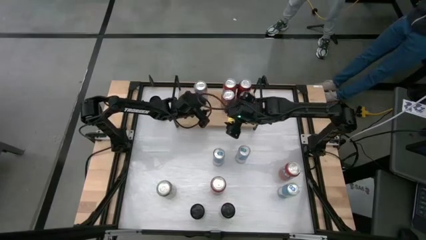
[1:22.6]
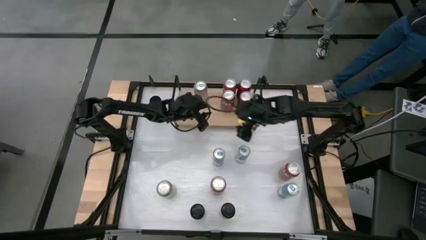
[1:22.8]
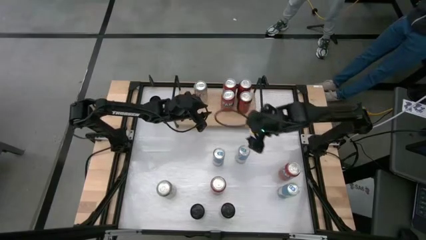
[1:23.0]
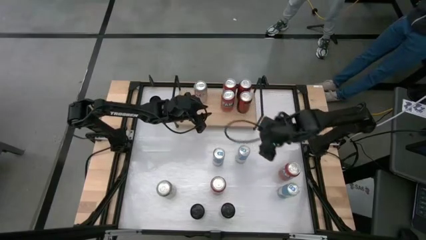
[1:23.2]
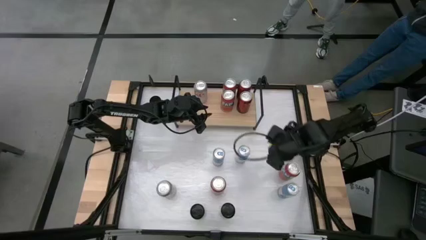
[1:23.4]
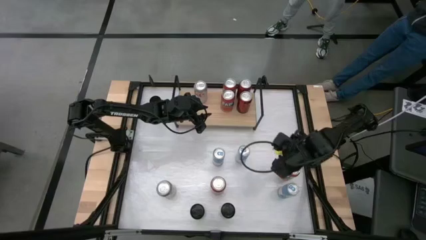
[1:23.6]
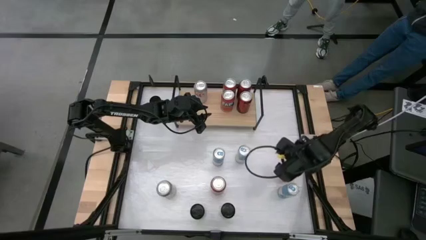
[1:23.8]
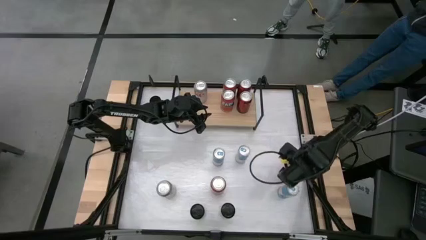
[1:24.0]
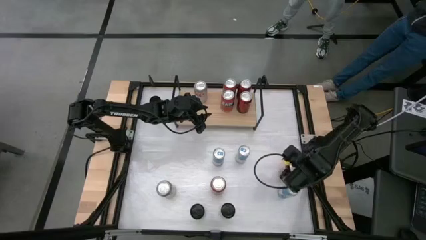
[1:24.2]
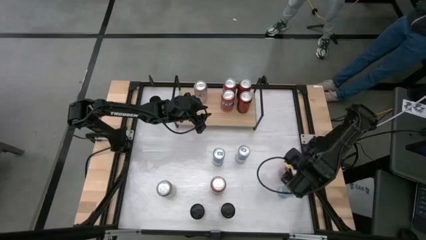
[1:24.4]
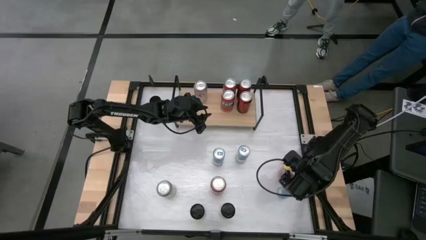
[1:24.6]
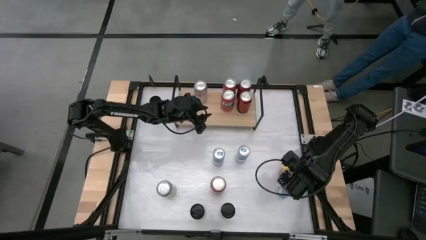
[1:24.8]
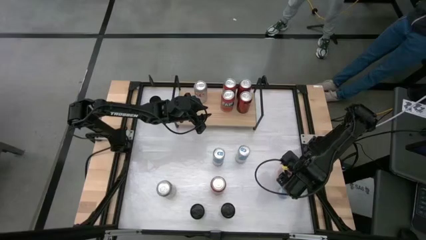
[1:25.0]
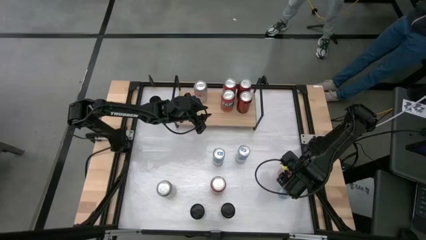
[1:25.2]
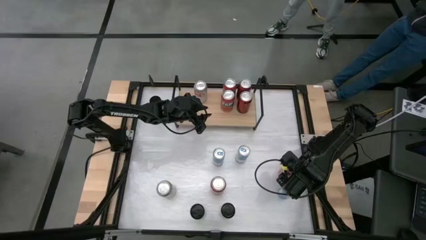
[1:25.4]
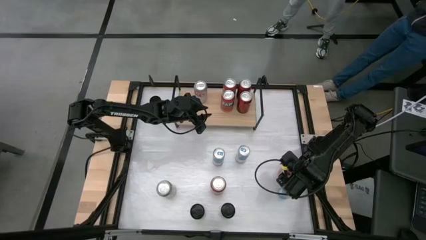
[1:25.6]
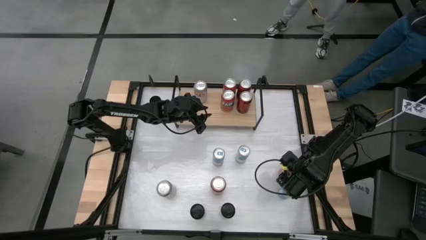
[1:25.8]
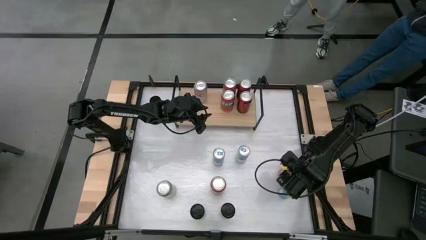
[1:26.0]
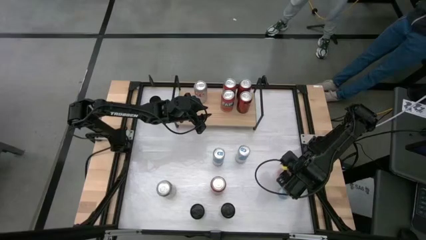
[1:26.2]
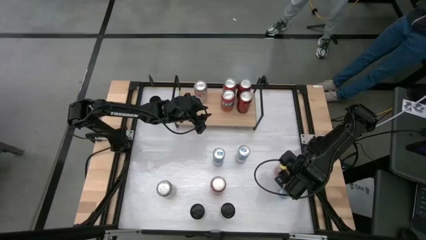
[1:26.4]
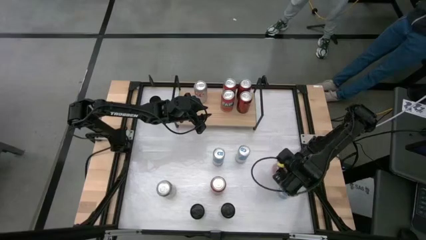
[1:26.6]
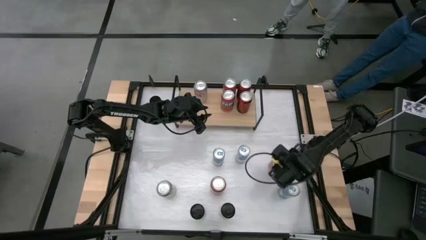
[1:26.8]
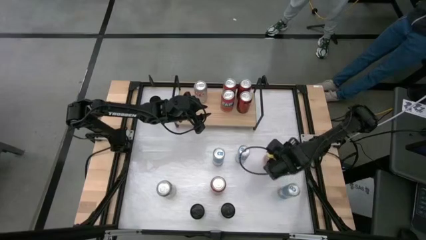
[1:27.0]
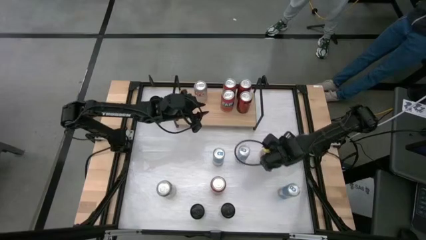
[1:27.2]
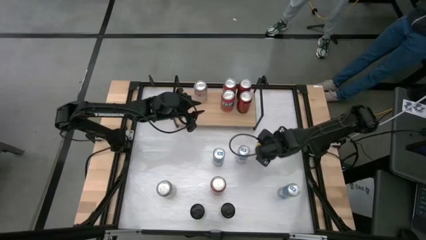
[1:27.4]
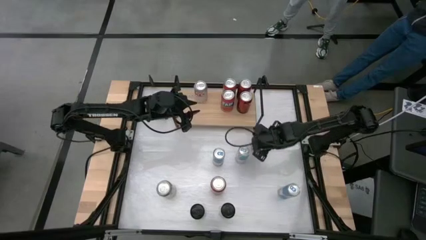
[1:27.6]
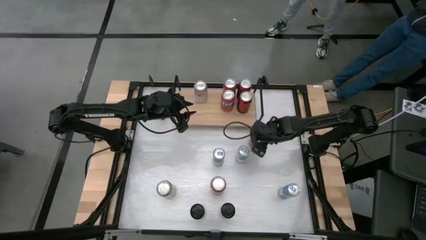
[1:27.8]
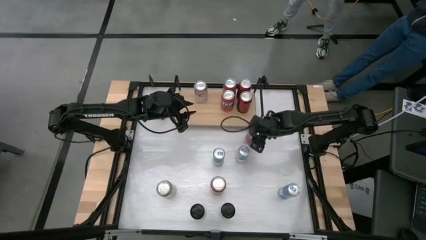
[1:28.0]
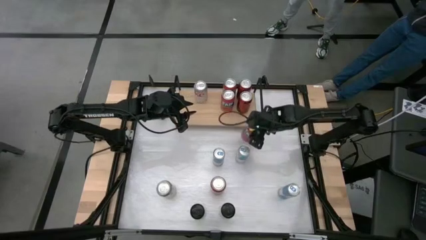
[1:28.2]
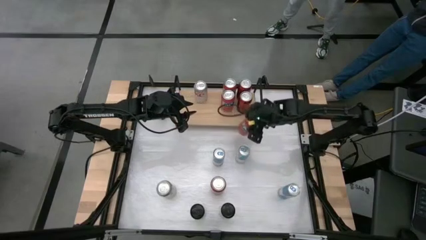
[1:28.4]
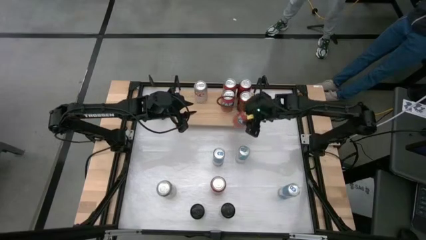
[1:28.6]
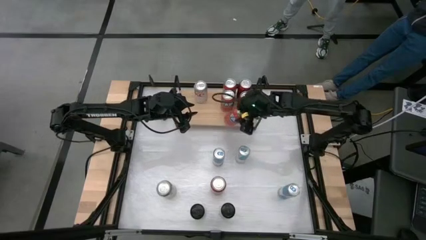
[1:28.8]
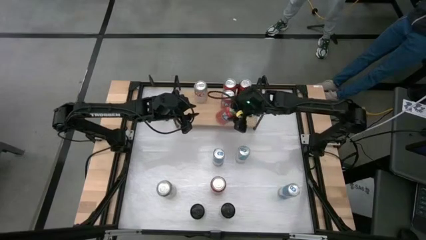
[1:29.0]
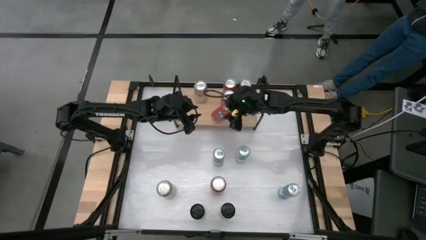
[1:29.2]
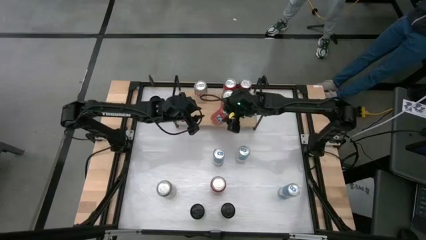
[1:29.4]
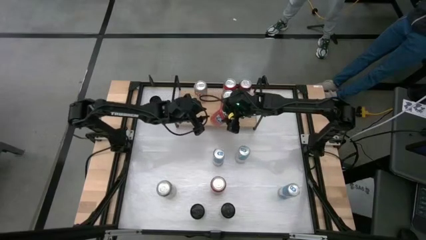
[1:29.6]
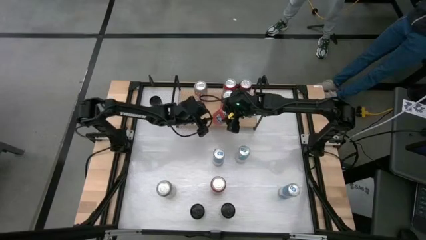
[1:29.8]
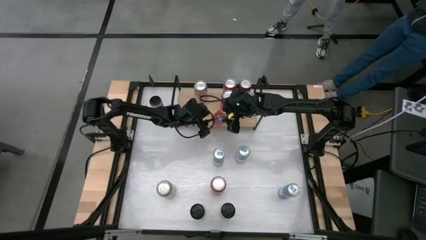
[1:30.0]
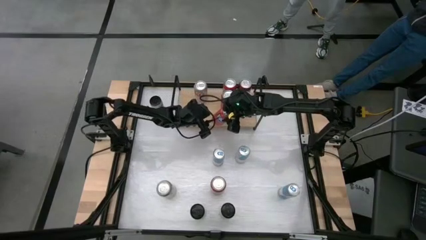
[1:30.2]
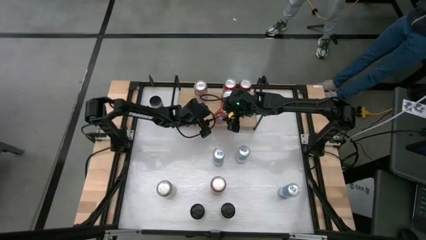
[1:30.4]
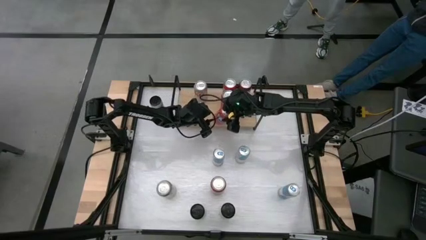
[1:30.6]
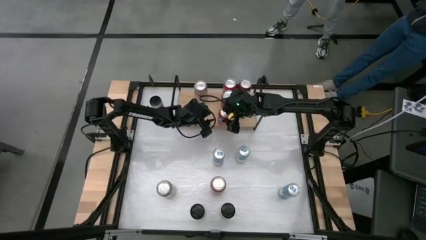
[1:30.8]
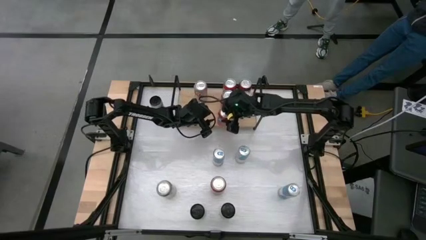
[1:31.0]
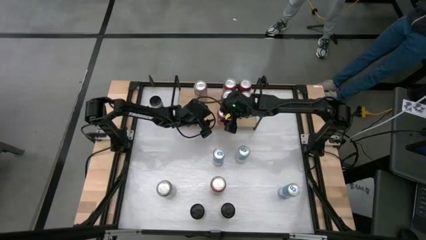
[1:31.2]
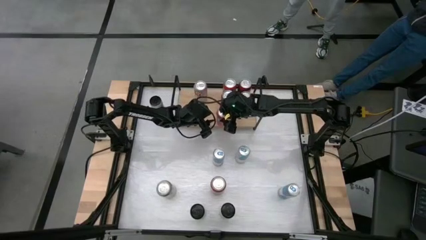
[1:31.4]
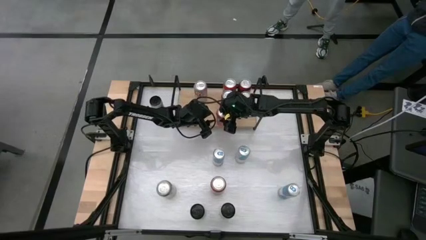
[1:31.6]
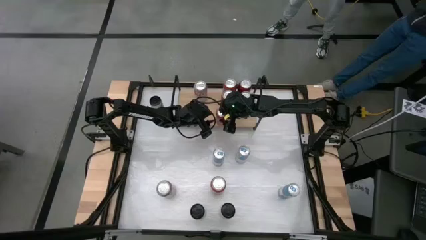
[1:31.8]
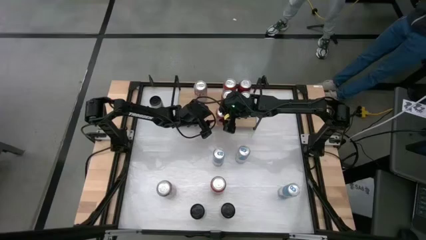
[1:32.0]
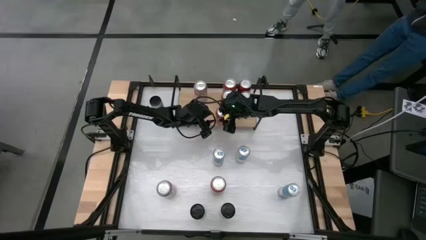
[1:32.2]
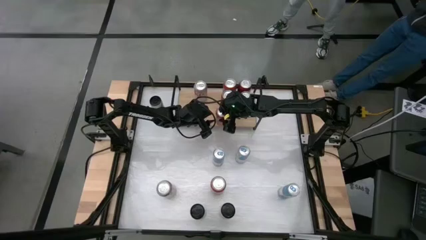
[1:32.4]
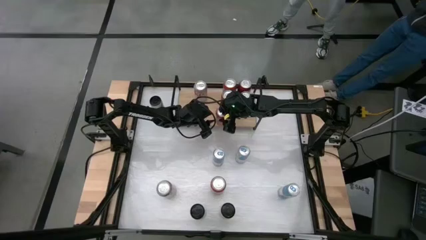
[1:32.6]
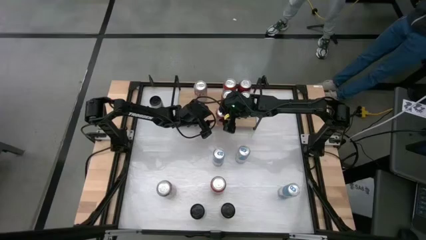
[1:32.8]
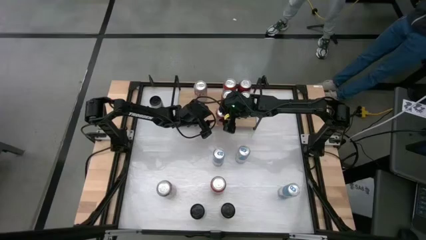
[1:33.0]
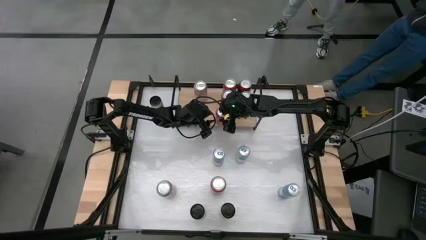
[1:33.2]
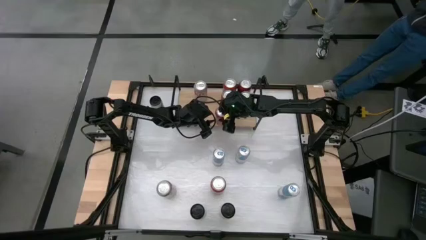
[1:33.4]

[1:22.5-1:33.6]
Task: Place canned beverage on shelf
Put the pink soda can on the shelf
